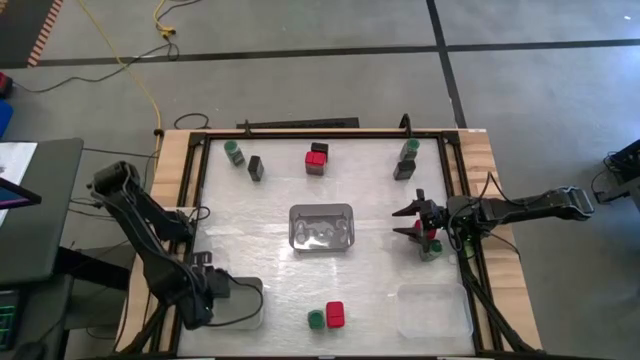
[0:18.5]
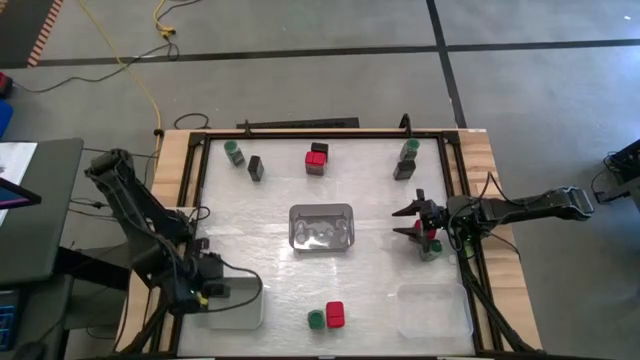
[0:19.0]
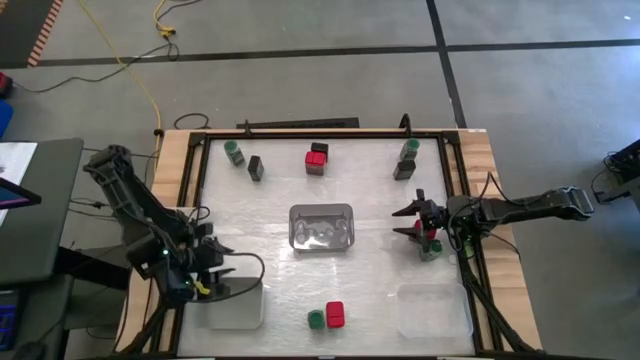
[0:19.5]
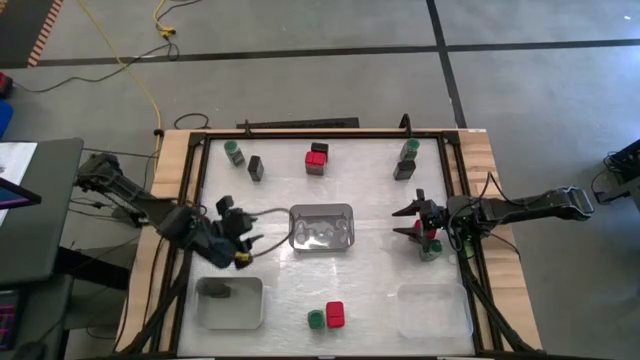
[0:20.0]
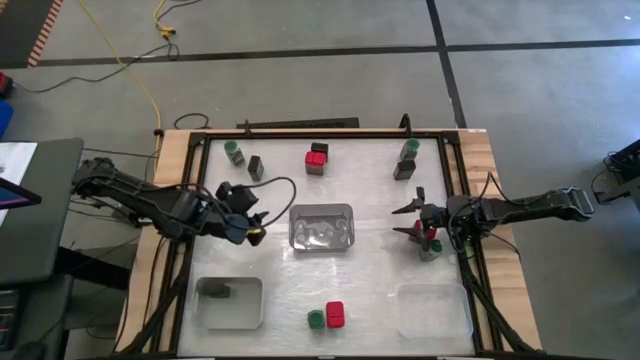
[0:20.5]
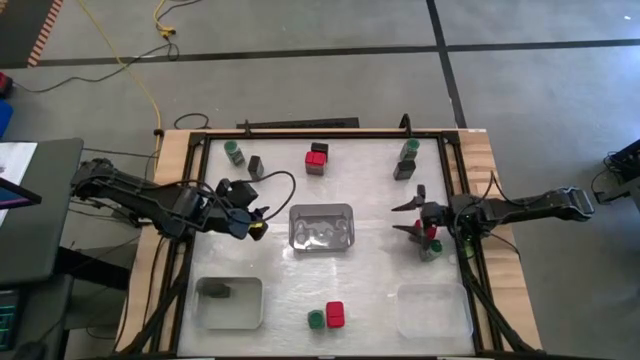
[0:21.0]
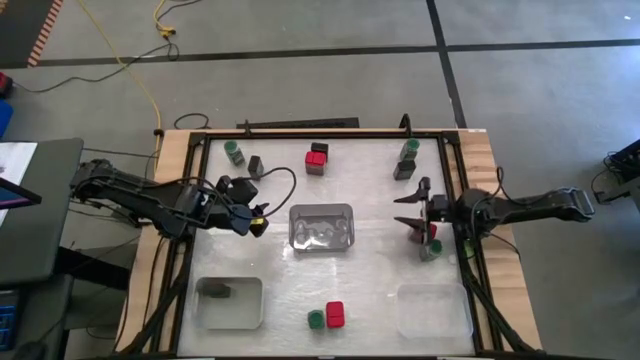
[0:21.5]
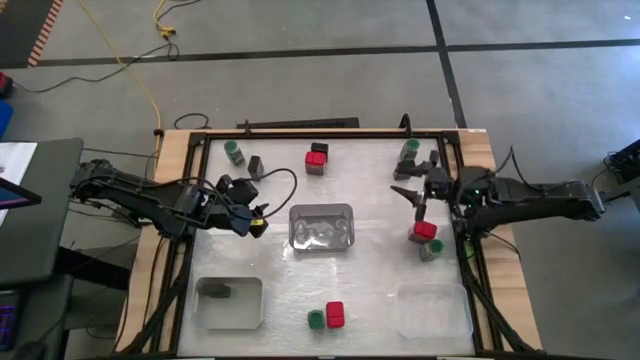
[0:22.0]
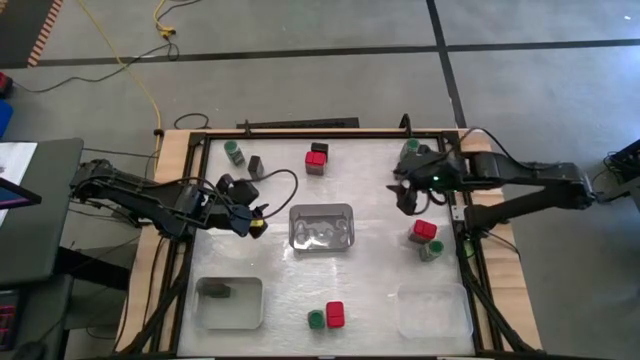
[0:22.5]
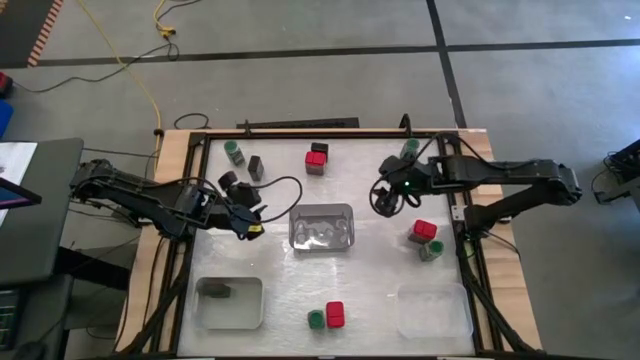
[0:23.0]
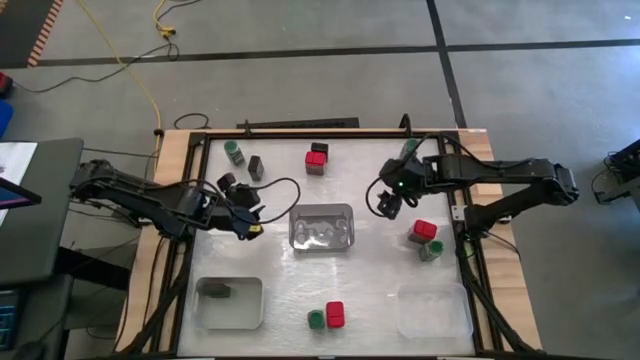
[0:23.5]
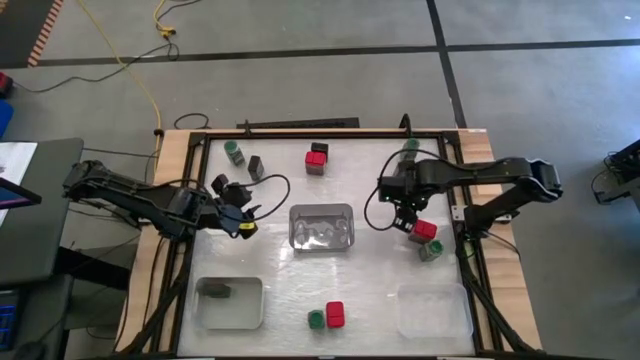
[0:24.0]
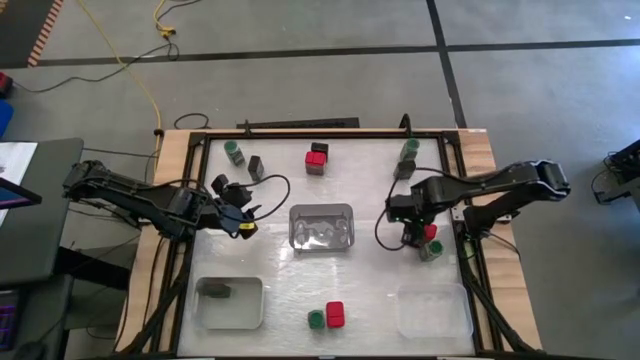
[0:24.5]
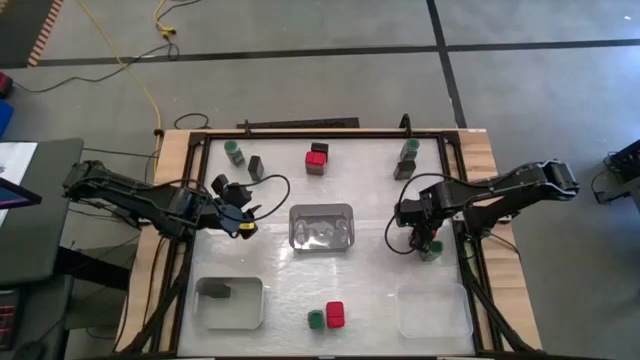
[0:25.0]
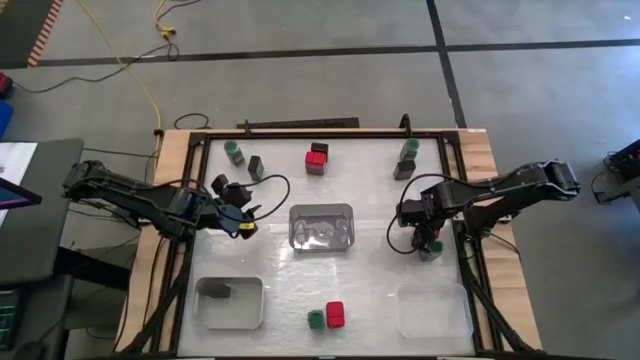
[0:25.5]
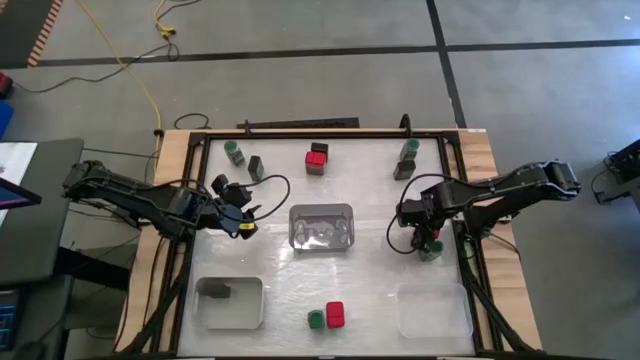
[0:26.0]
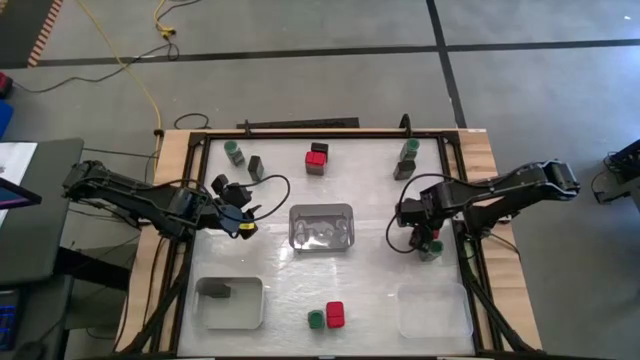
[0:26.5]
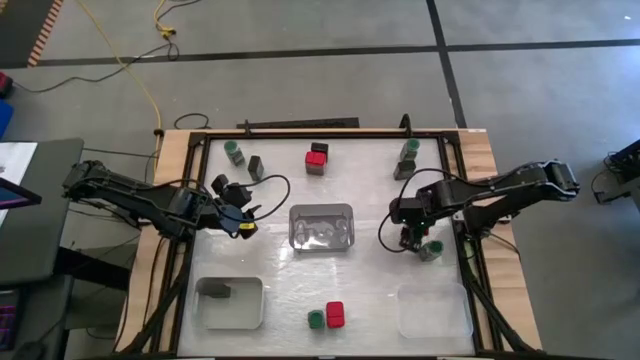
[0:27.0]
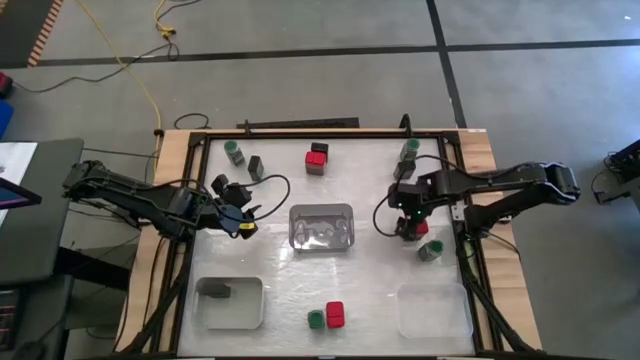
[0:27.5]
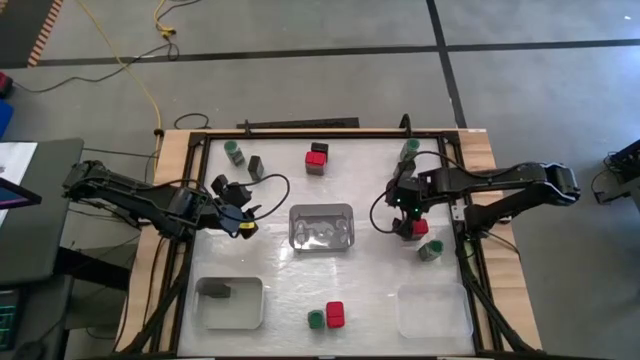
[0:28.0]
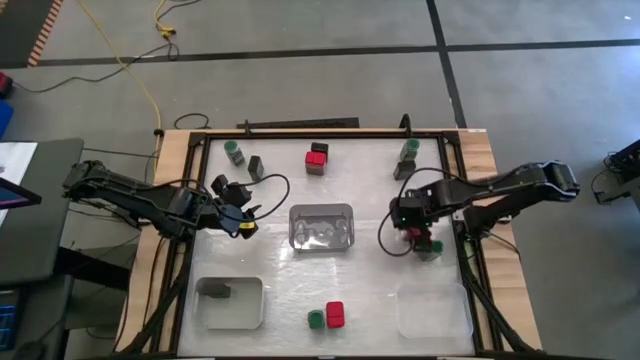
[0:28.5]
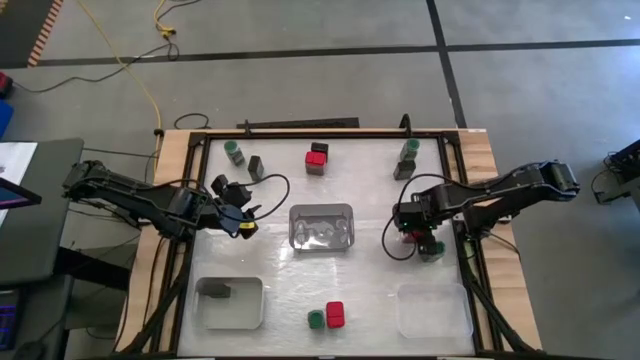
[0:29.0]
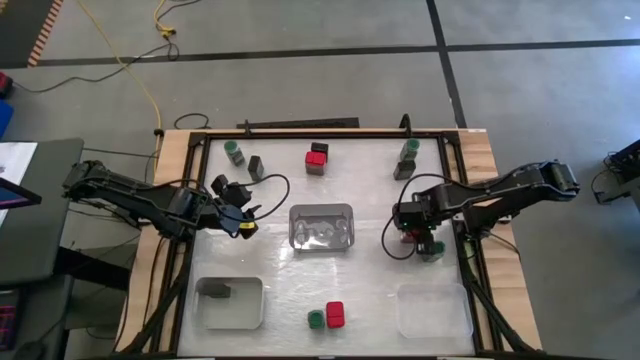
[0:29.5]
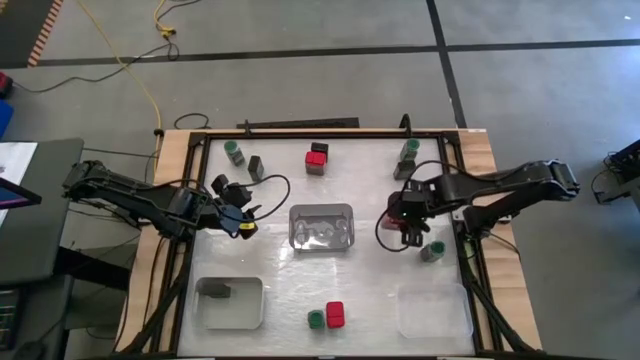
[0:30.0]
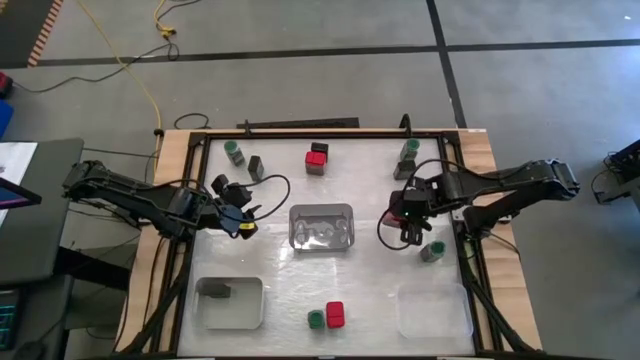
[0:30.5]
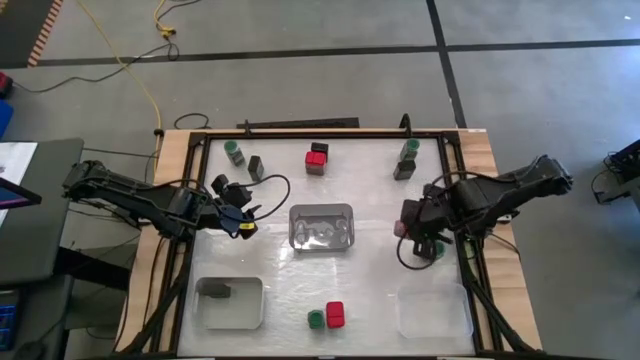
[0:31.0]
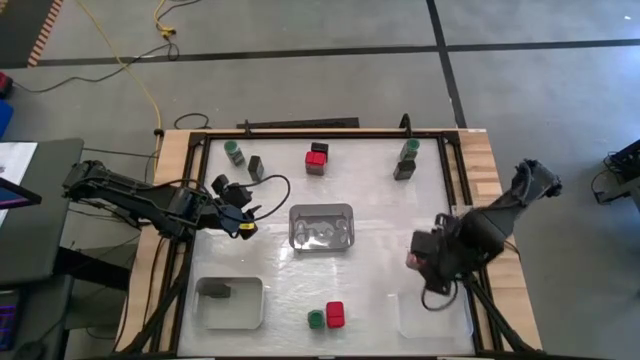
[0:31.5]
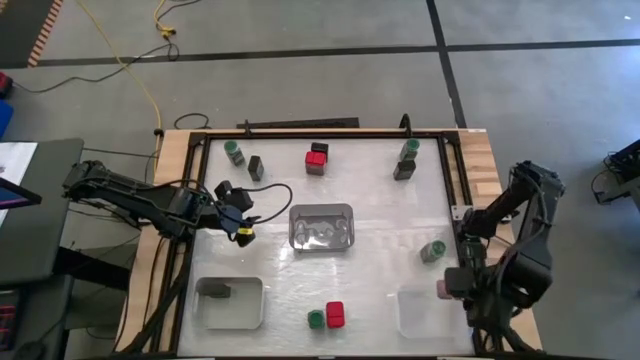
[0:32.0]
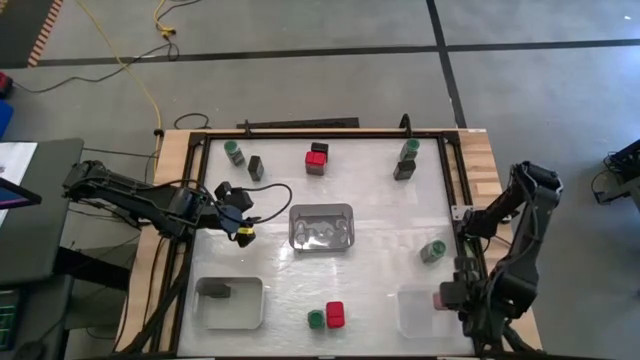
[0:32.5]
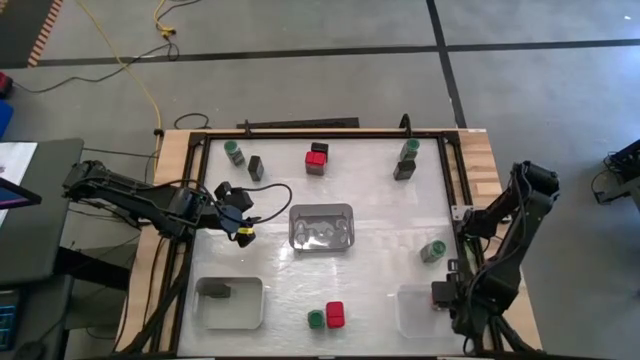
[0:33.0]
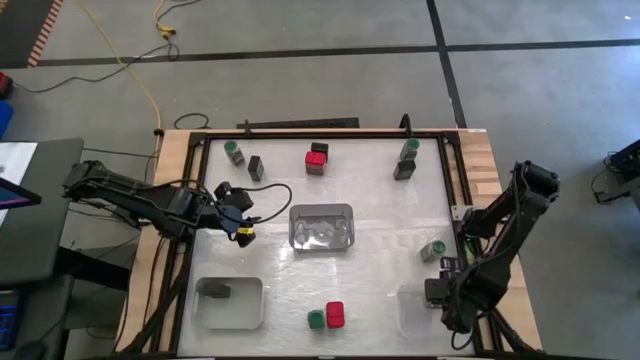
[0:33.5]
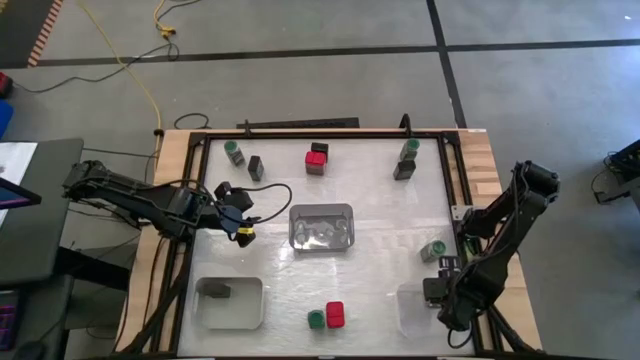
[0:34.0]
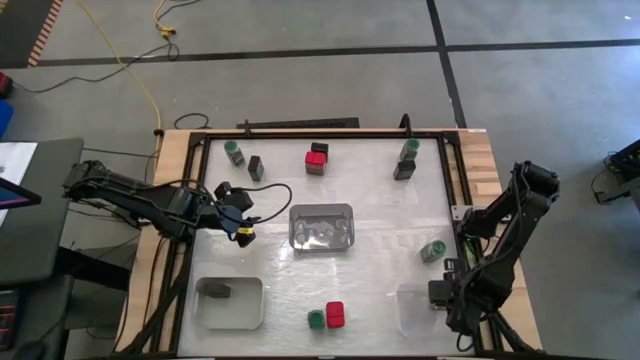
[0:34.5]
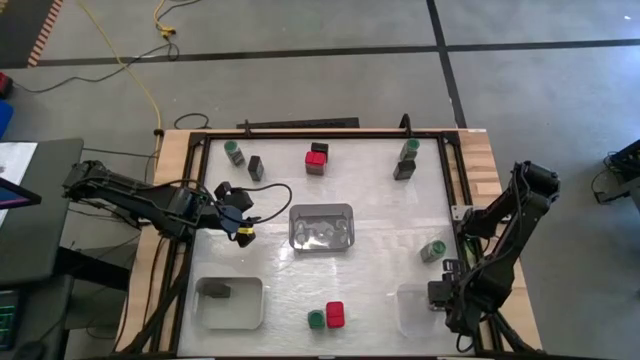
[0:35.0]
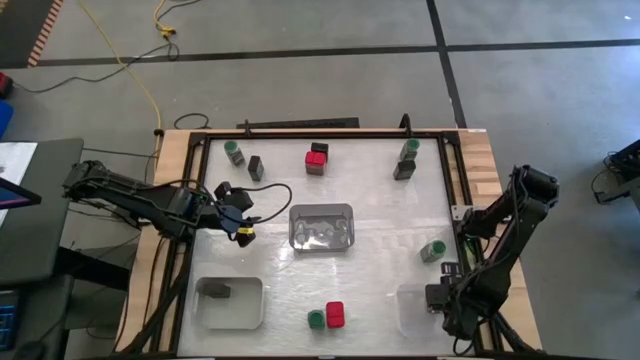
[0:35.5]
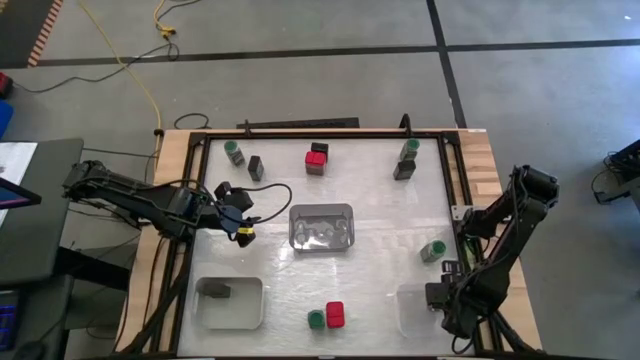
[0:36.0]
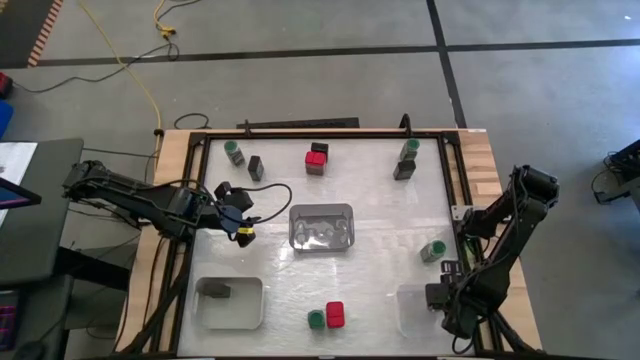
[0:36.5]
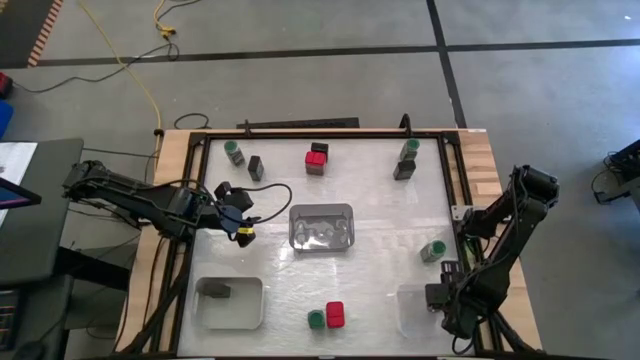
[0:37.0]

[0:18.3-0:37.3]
Task: Sort spices by type
Put the right red seasoning can into the transparent bin
